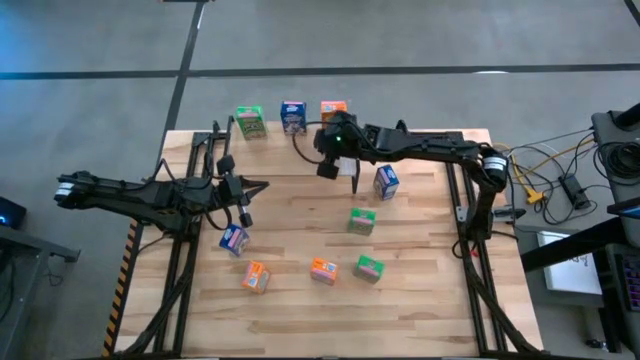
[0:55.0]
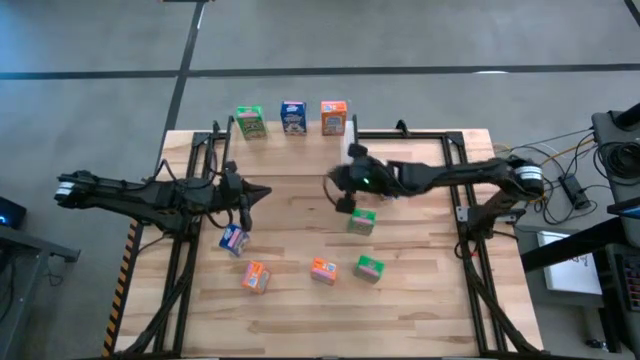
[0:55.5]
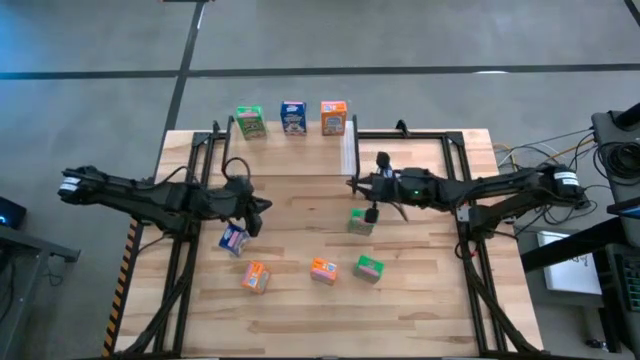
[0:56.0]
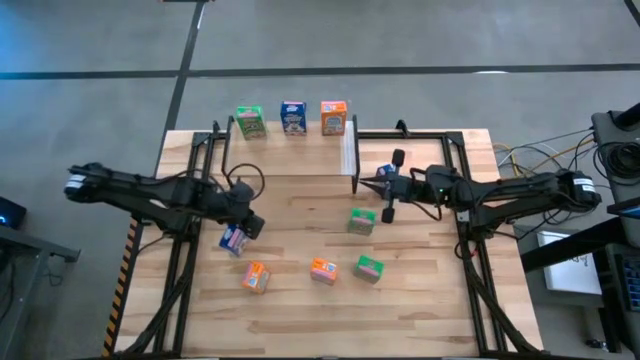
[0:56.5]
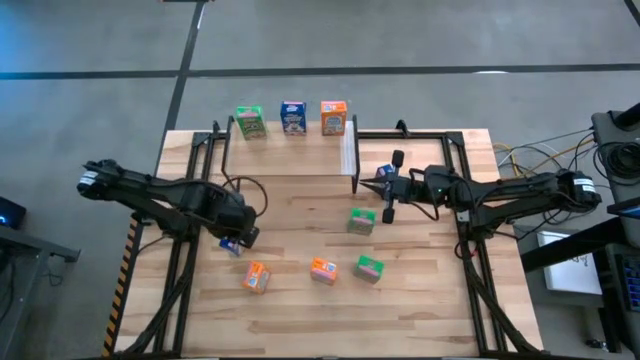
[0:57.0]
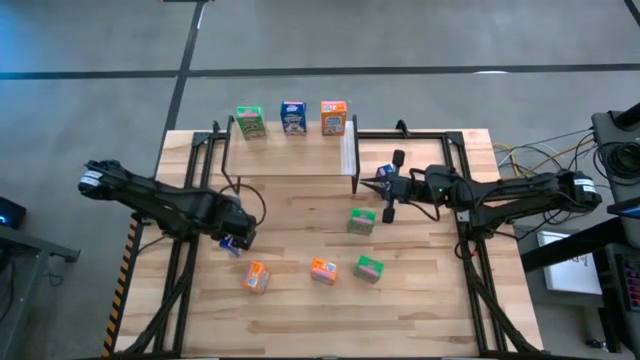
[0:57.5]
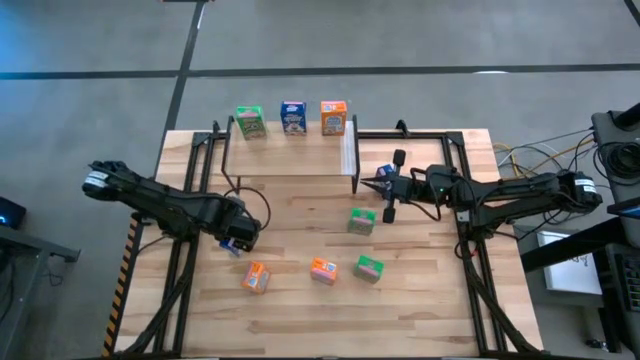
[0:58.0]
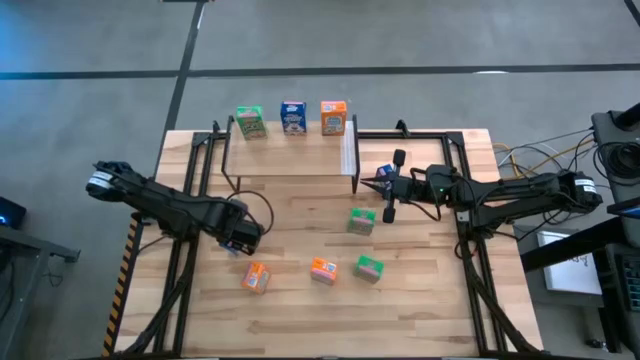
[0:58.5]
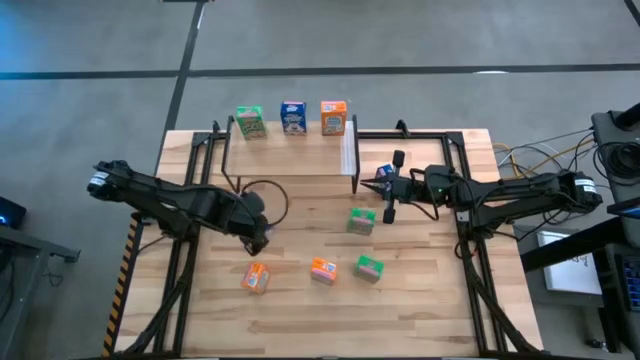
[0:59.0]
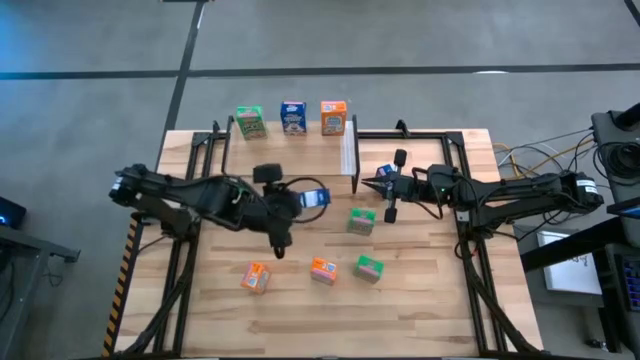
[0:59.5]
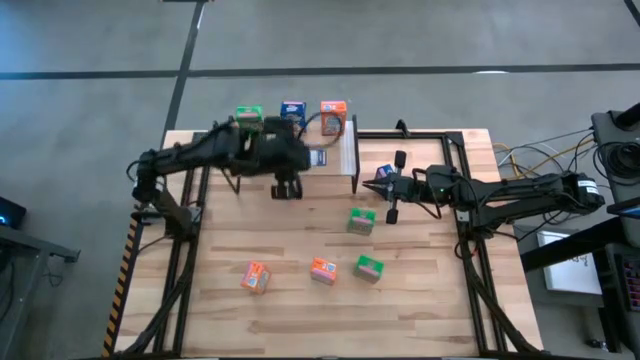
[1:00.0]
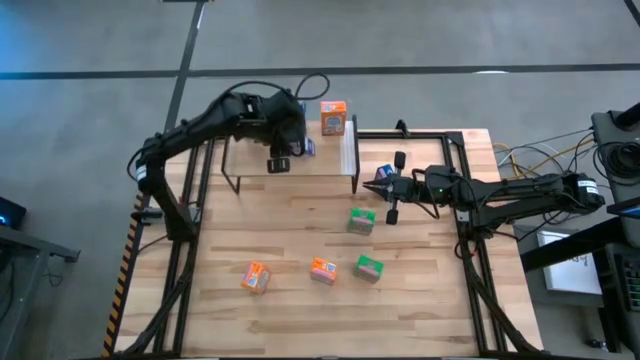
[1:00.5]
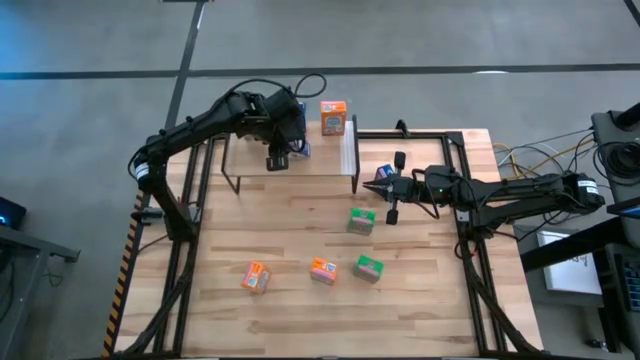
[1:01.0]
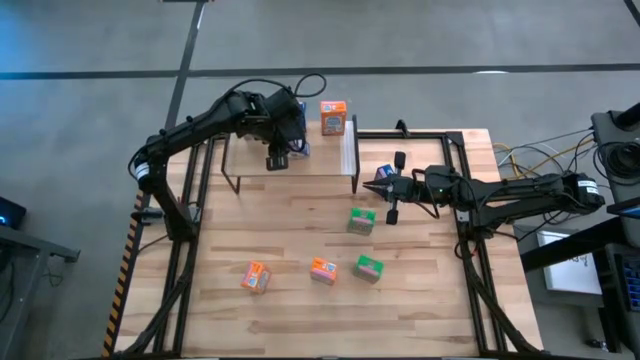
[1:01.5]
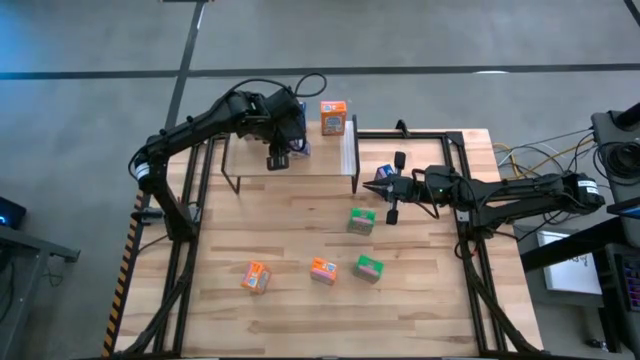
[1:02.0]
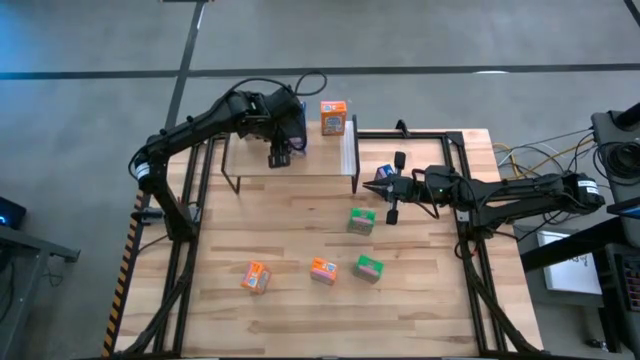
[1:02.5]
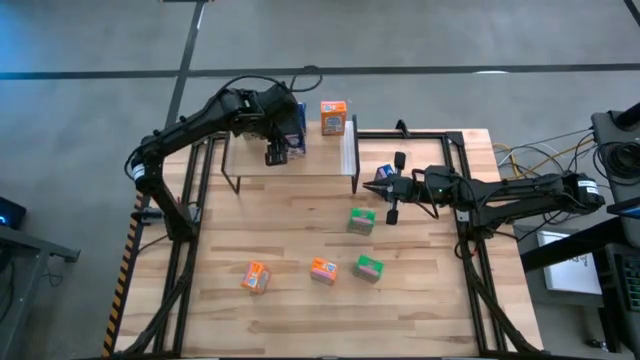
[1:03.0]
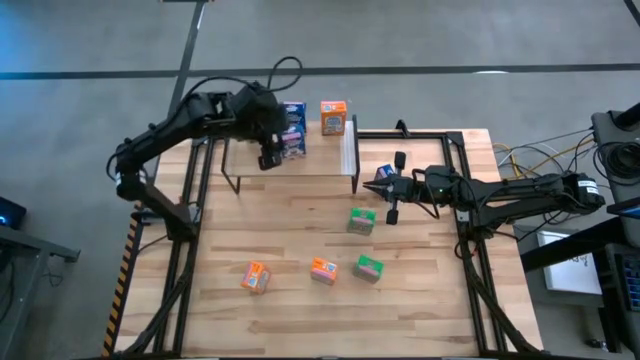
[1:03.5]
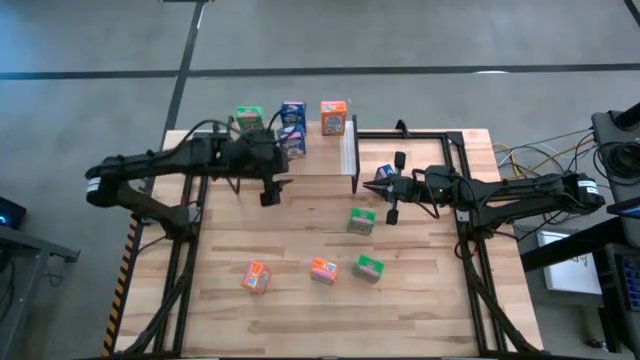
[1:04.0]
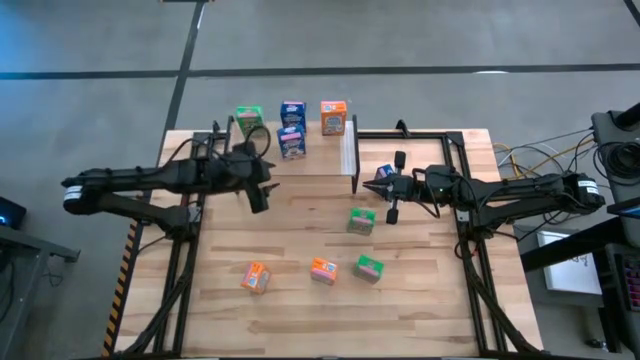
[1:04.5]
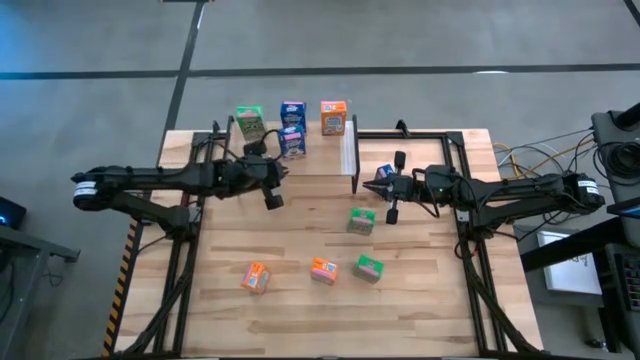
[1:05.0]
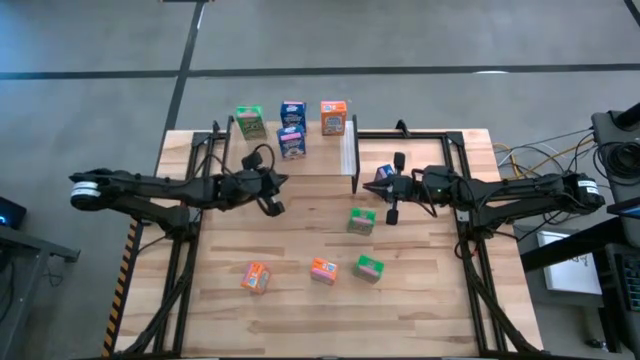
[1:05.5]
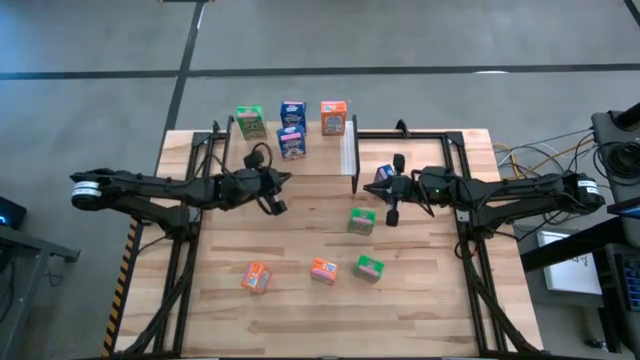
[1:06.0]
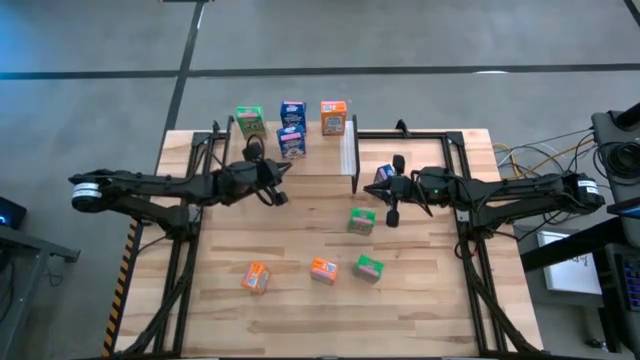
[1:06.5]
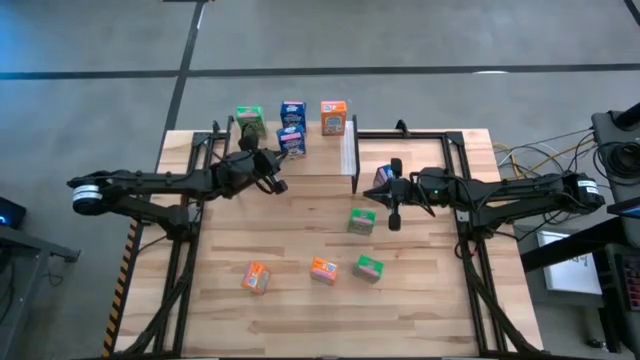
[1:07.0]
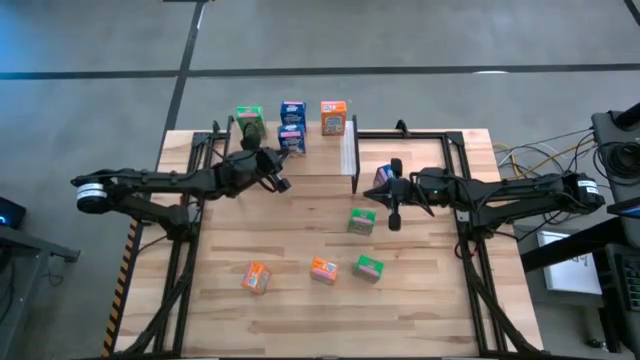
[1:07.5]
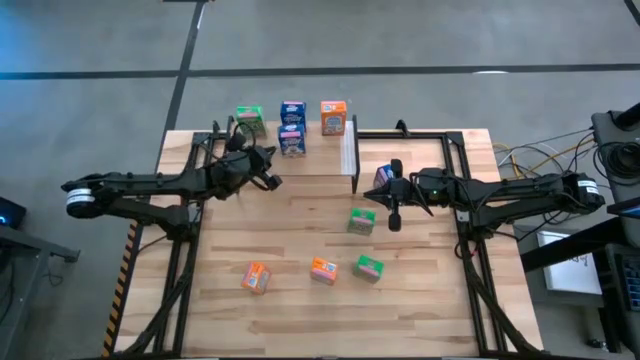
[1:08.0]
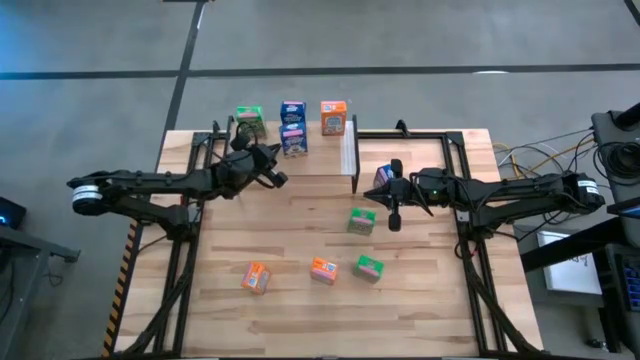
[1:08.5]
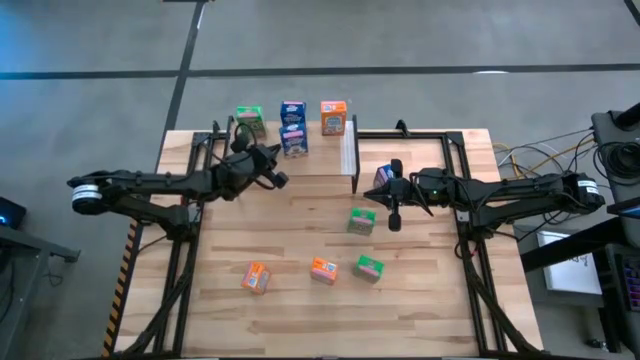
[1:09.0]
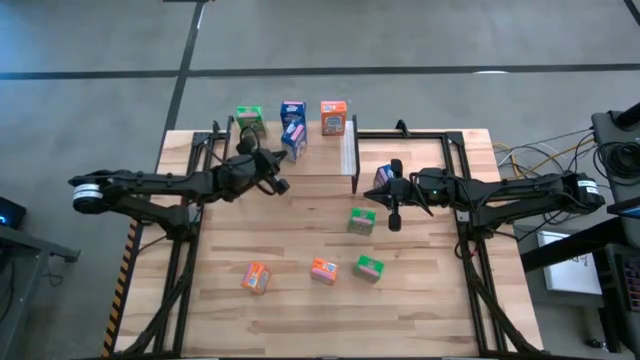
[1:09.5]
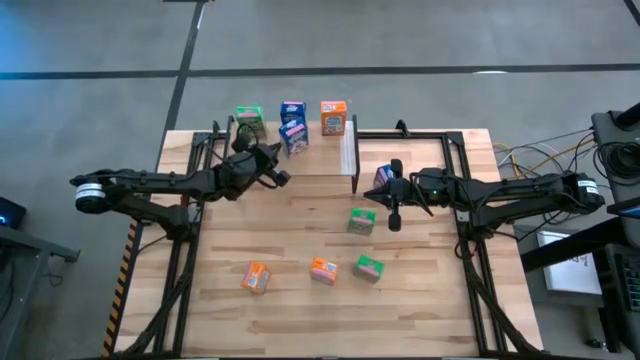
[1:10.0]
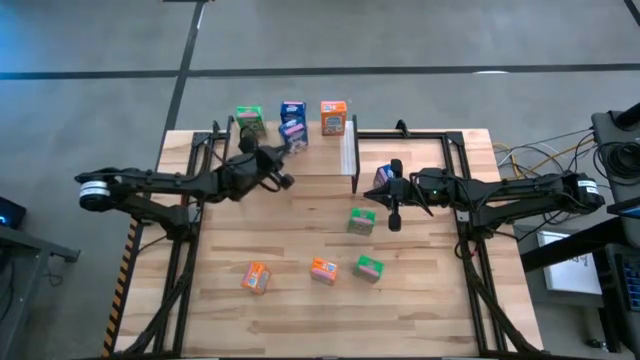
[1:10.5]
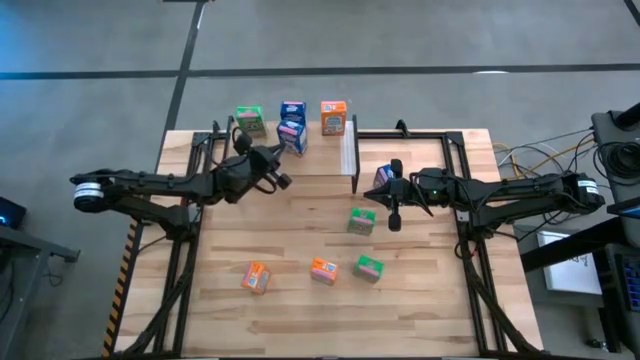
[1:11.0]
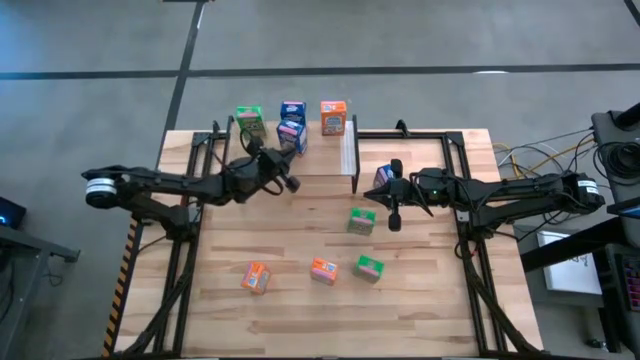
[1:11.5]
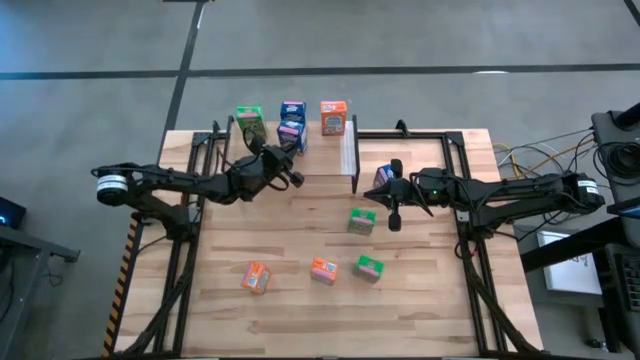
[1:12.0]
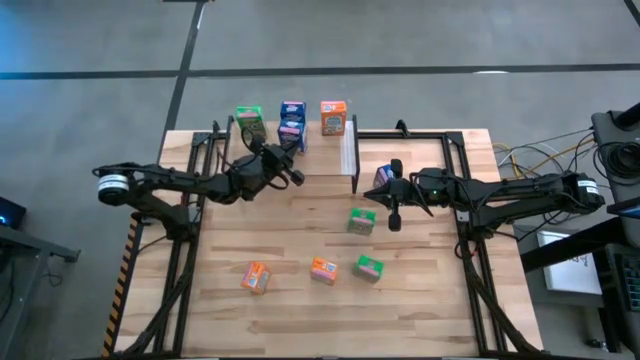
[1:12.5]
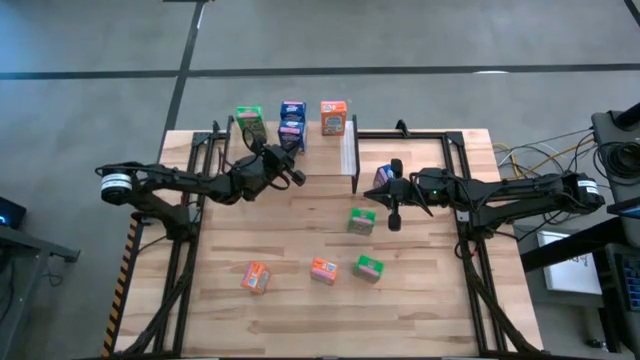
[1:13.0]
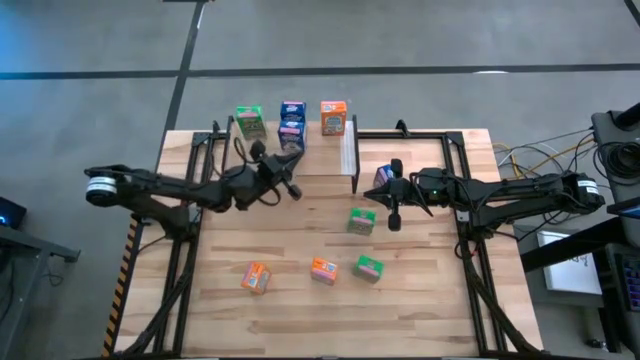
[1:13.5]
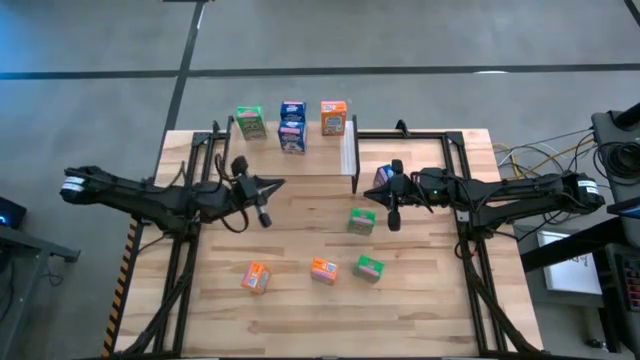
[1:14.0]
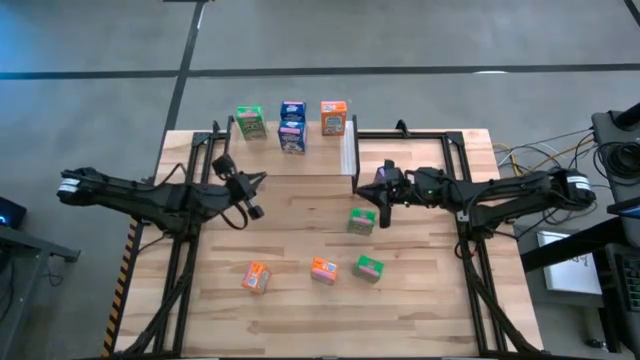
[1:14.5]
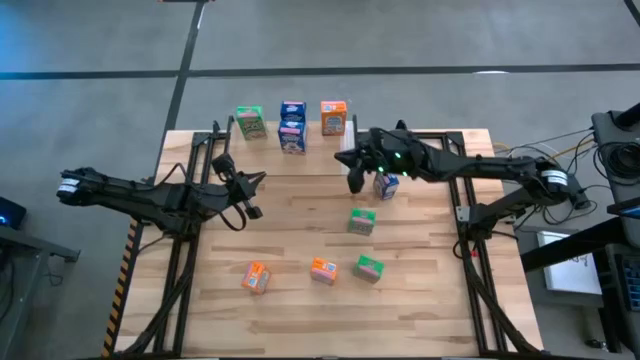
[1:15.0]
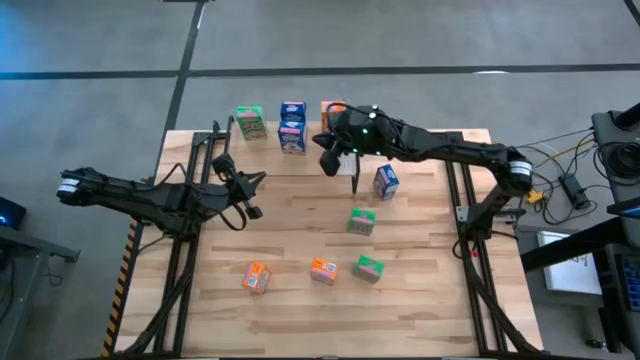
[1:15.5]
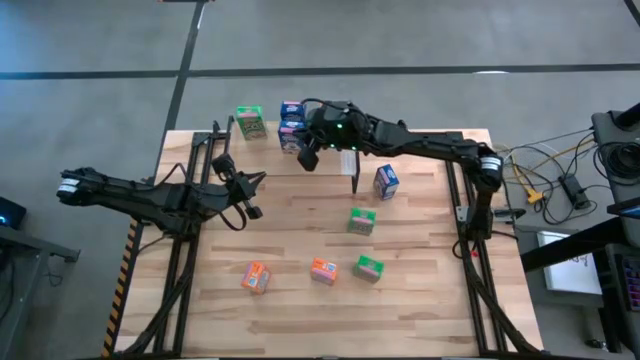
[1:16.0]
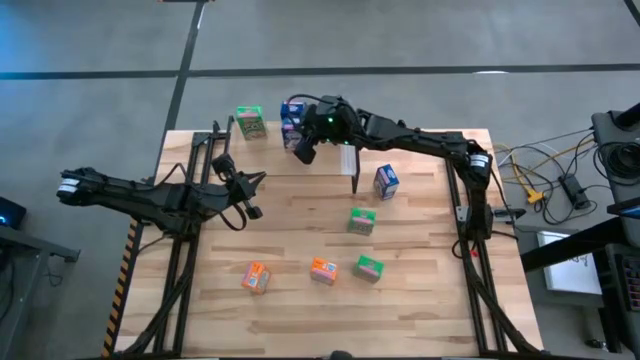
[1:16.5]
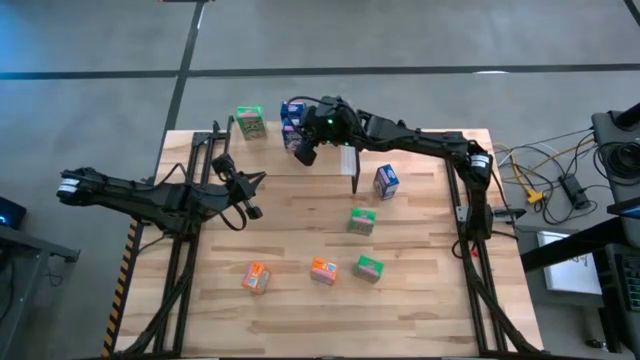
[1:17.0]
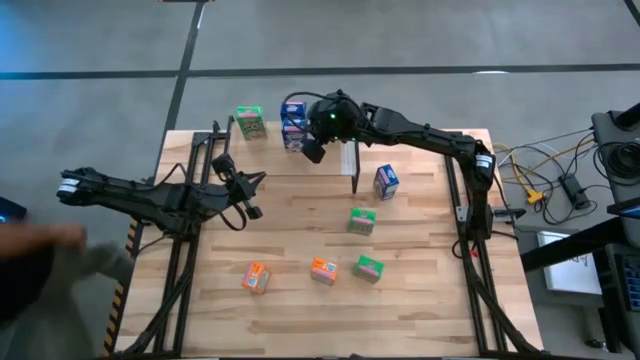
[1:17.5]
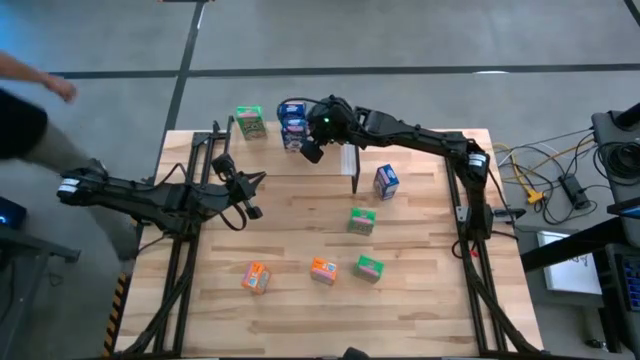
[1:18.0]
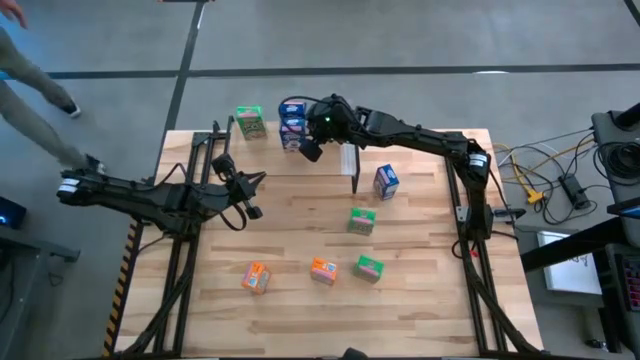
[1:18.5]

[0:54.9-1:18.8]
Task: Stack cereal on shelf
Put the bottom blue cereal box on the shelf aligned with the other blue cereal box
